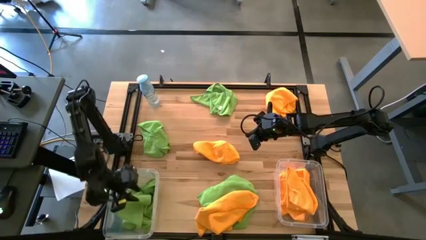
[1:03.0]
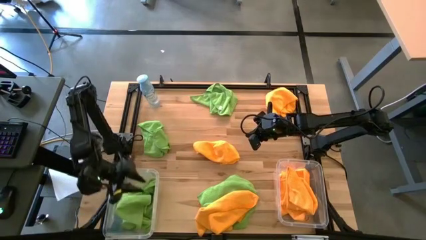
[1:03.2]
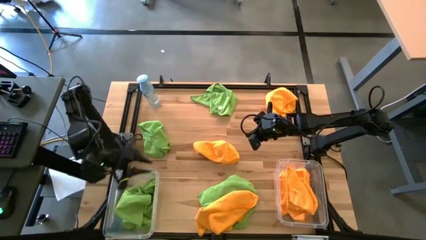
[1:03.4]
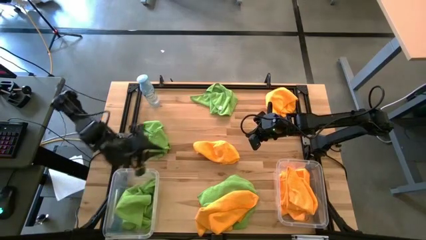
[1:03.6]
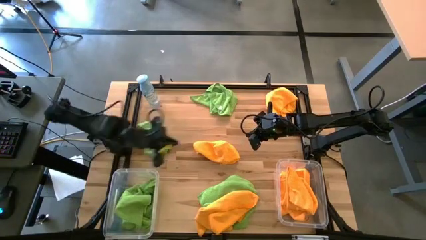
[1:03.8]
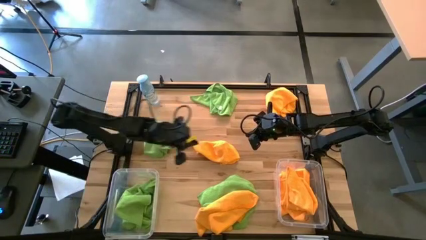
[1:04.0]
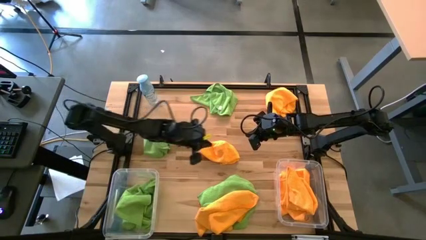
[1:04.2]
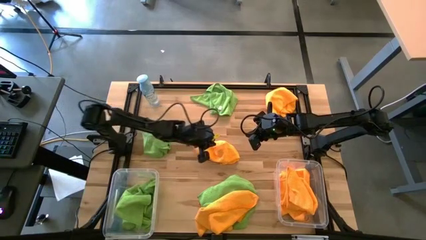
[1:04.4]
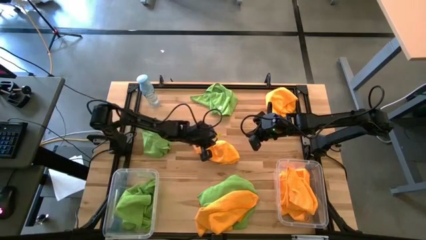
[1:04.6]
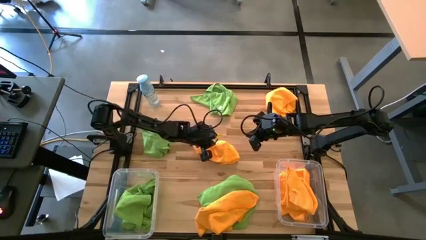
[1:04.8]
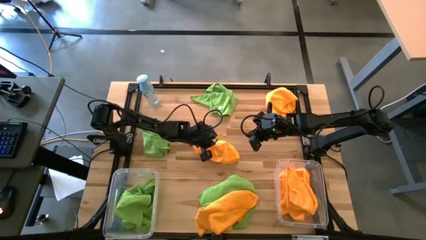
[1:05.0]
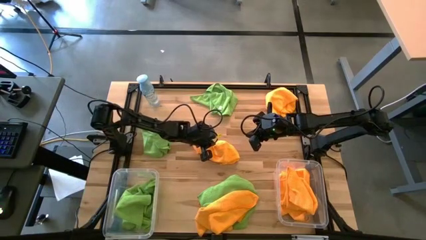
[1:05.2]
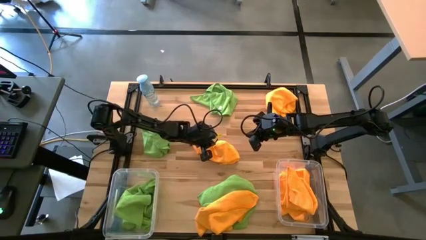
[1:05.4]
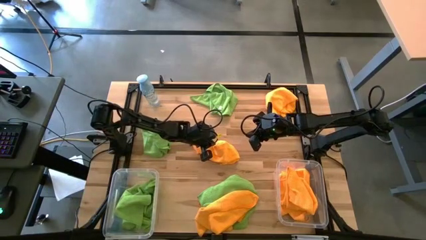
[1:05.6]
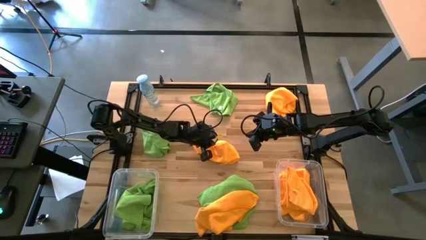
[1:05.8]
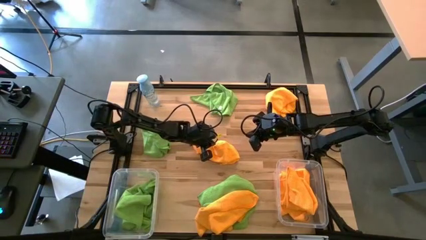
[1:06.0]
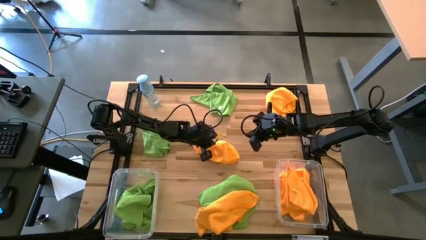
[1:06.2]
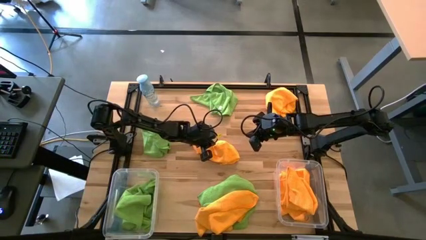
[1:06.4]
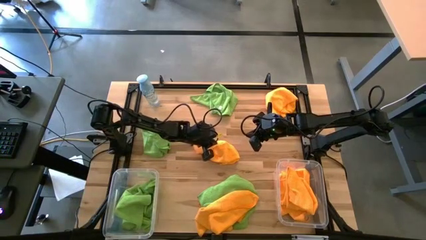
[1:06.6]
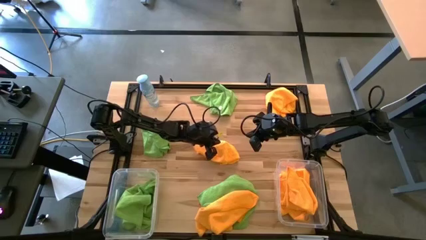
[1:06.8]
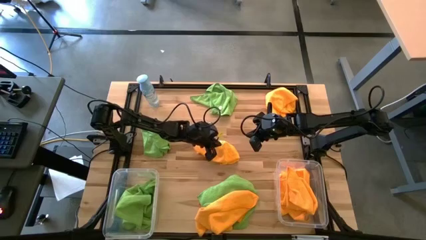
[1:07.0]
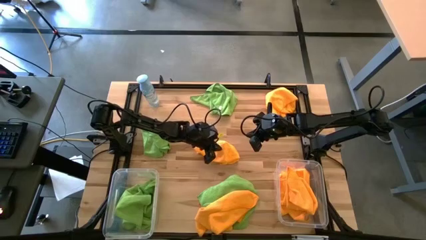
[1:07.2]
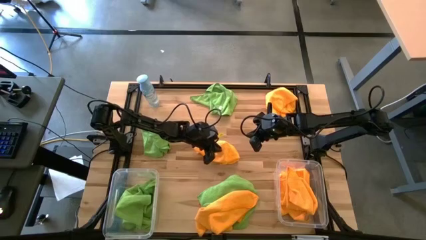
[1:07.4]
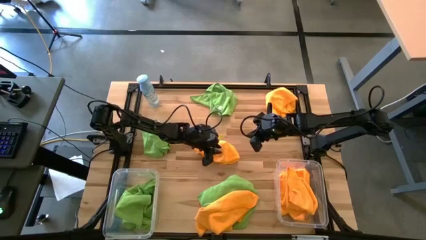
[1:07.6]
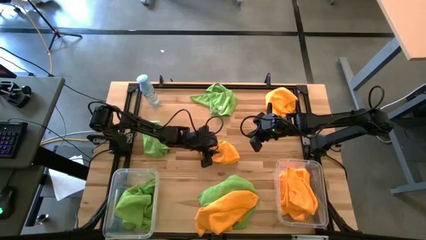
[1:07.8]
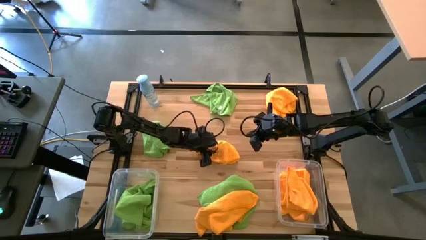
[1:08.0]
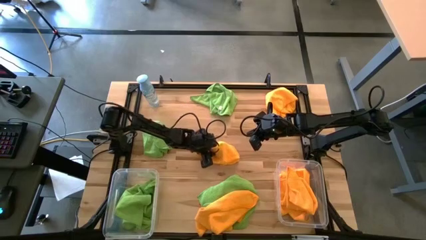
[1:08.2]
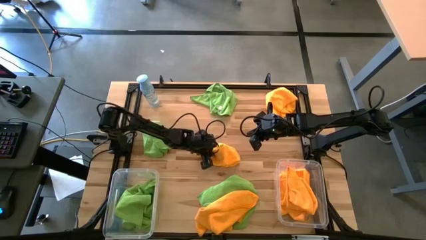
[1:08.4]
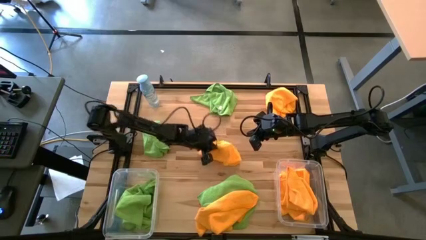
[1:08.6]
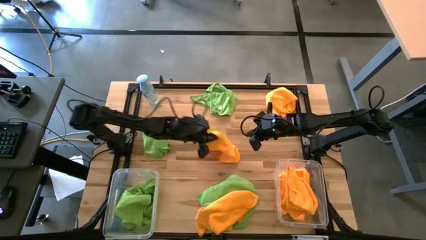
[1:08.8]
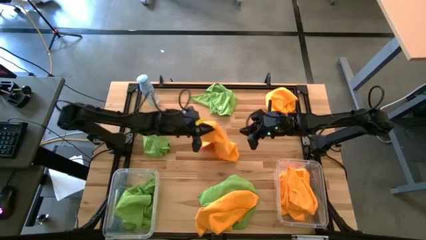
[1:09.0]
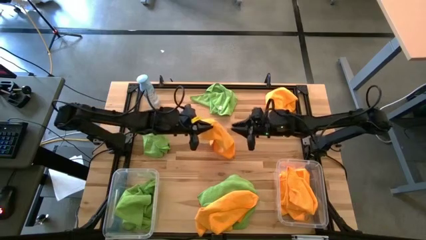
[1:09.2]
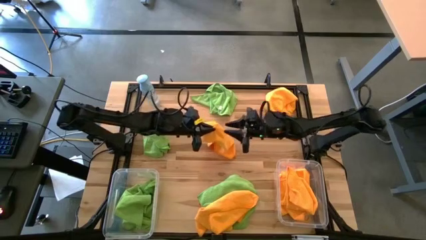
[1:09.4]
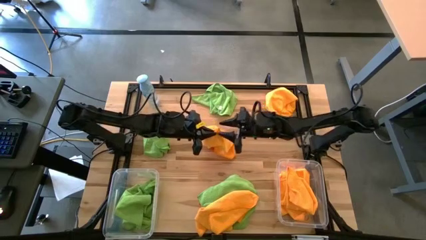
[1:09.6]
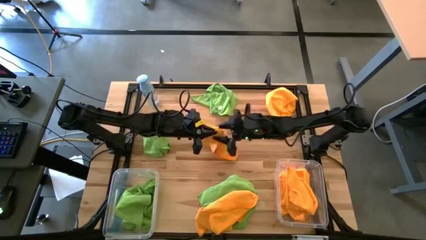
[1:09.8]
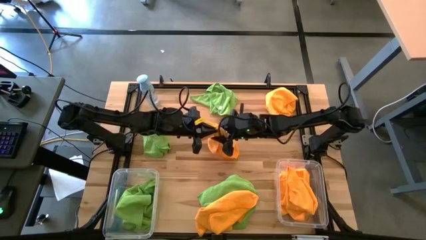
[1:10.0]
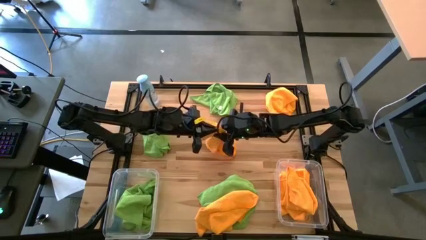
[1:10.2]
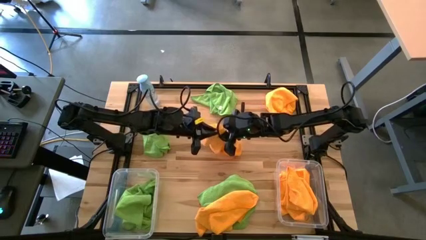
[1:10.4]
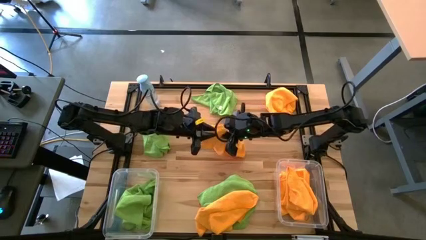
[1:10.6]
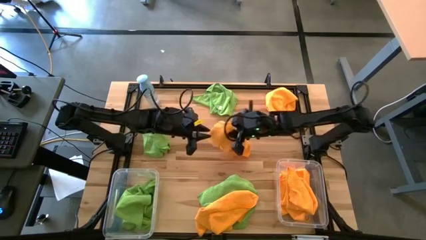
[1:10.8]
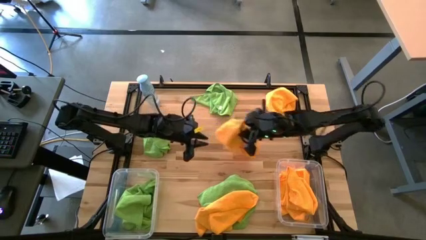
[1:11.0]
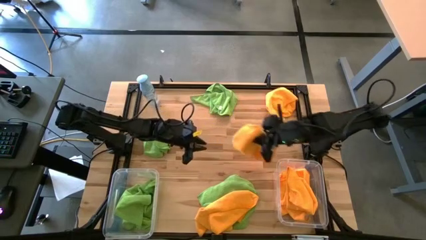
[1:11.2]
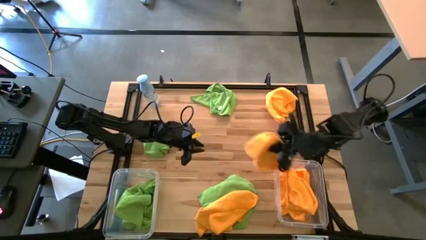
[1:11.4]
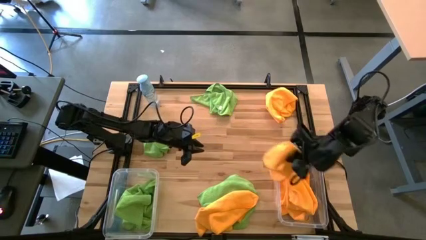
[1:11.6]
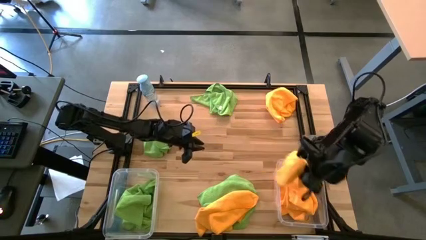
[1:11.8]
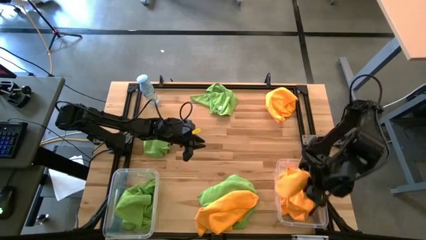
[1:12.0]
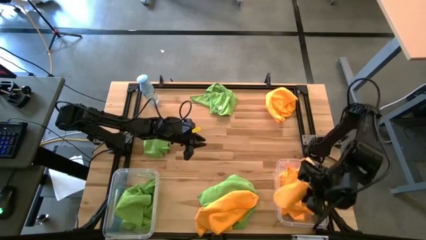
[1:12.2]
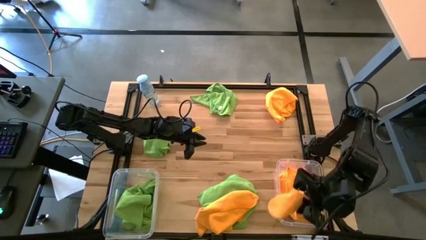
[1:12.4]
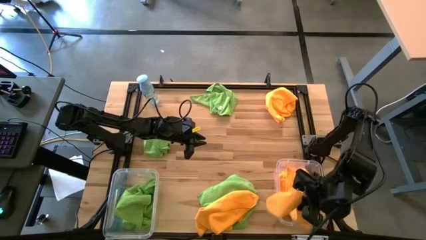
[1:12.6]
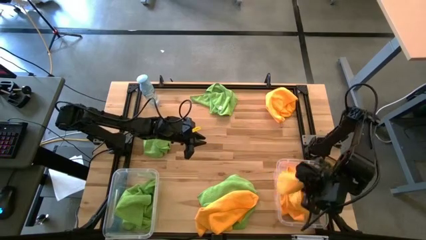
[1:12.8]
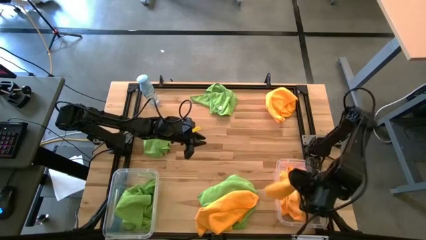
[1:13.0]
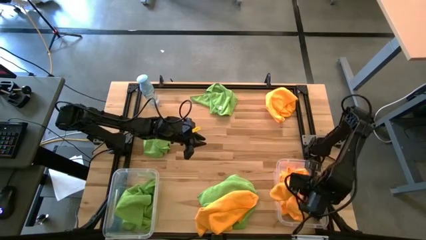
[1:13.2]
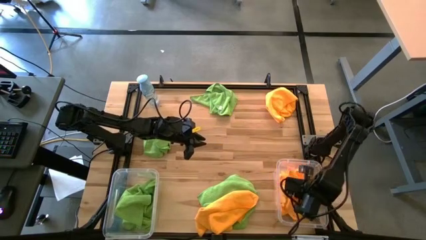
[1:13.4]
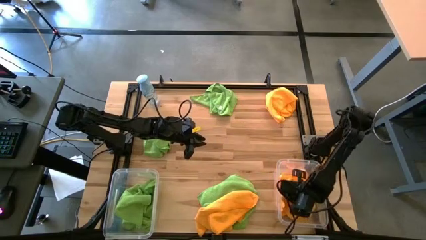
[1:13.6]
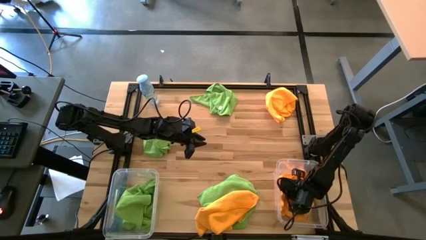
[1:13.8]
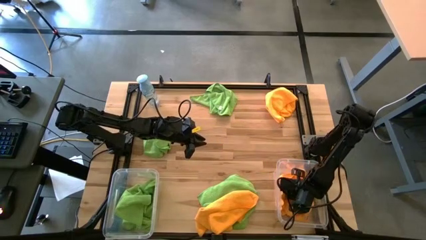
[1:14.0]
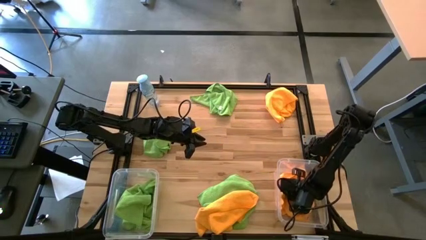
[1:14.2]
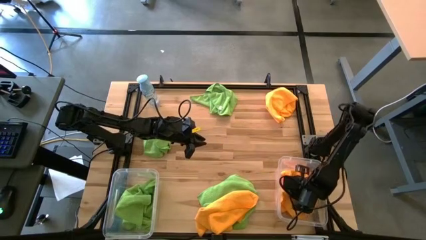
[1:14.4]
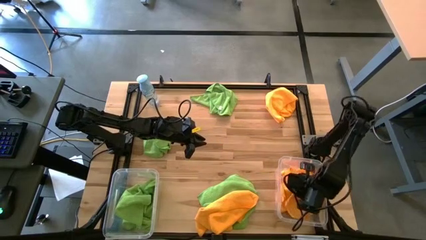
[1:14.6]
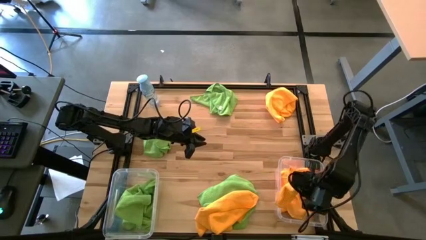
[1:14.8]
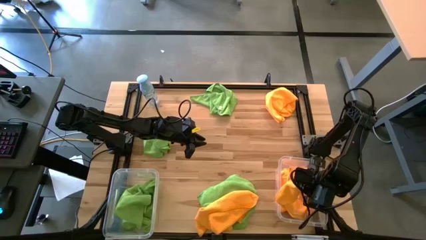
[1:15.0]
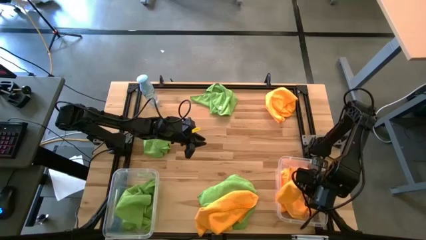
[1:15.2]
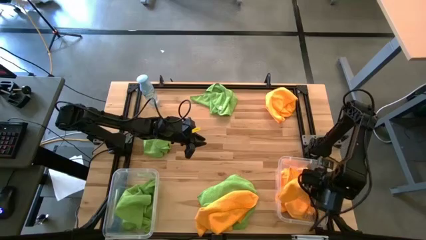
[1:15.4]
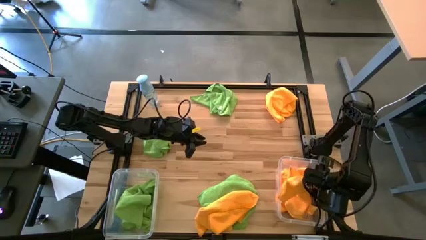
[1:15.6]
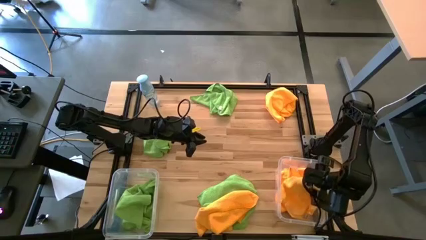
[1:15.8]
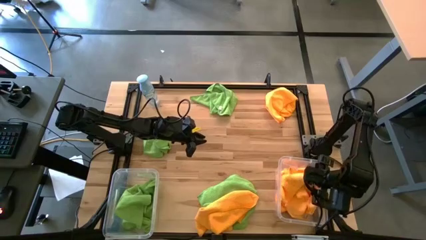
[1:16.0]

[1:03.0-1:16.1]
Task: Sort microfiber towel by color & place in baskets
Put the yellow towel into the right transparent bin
